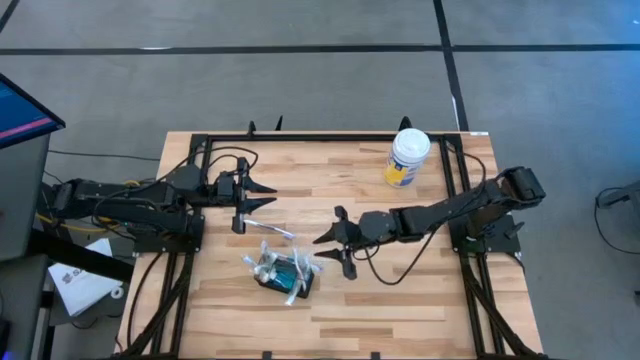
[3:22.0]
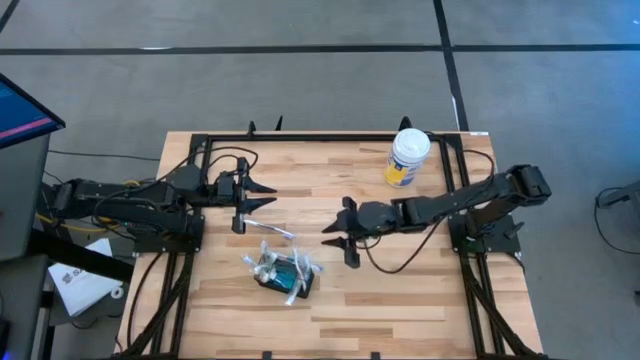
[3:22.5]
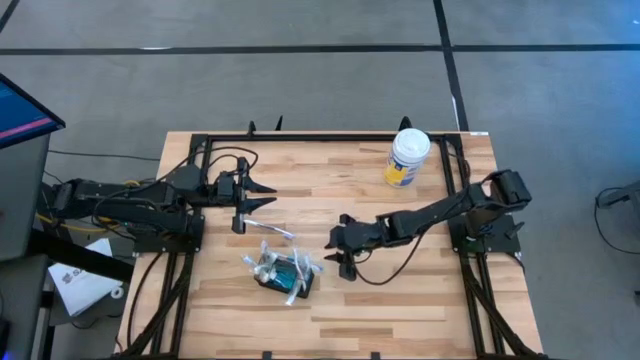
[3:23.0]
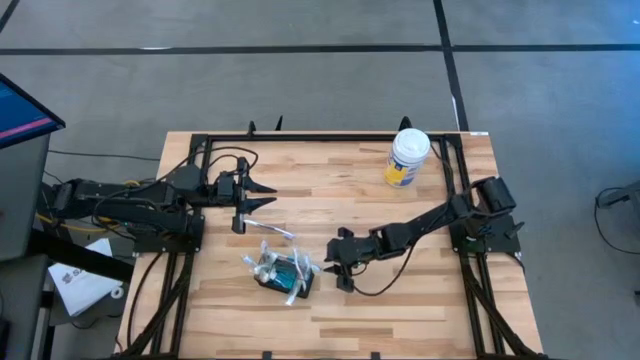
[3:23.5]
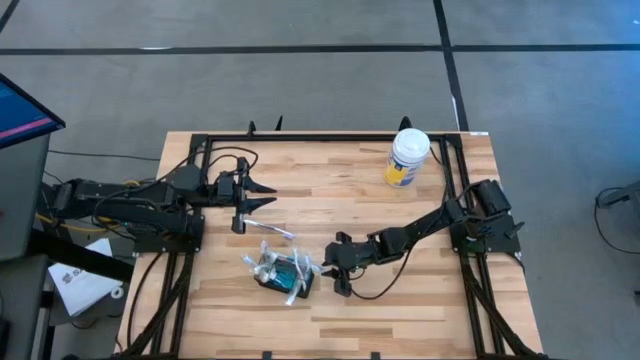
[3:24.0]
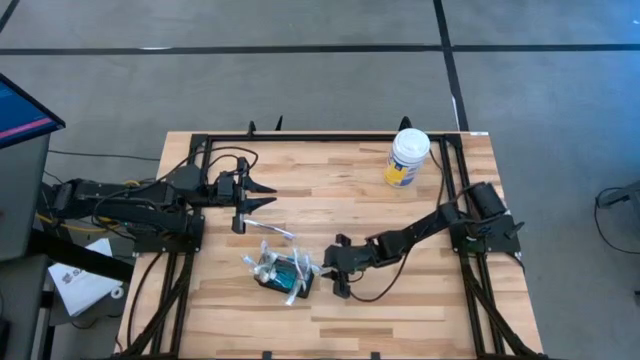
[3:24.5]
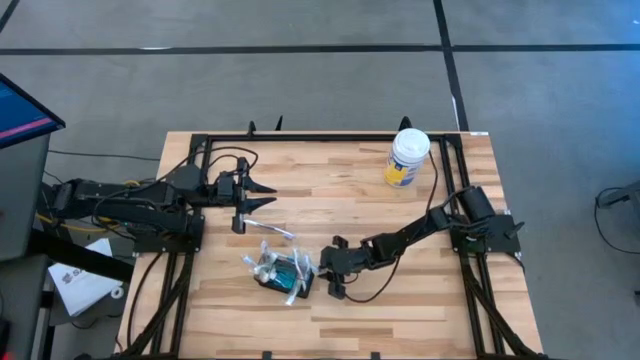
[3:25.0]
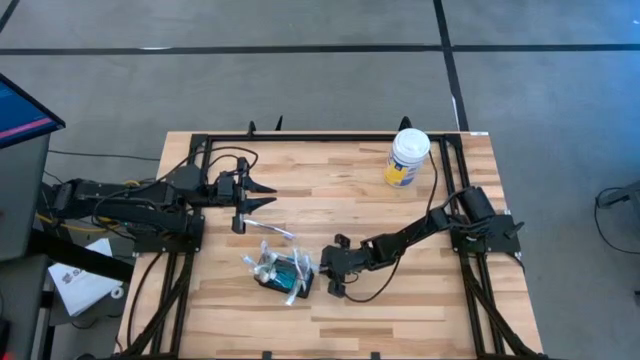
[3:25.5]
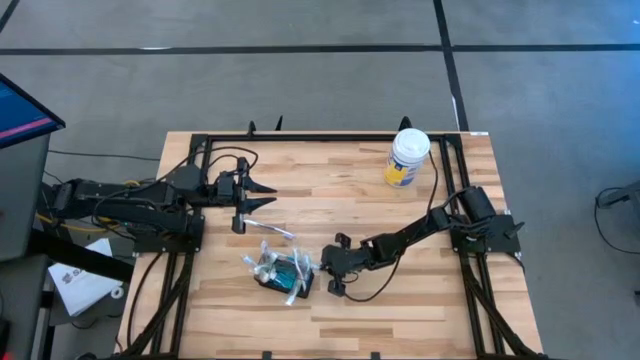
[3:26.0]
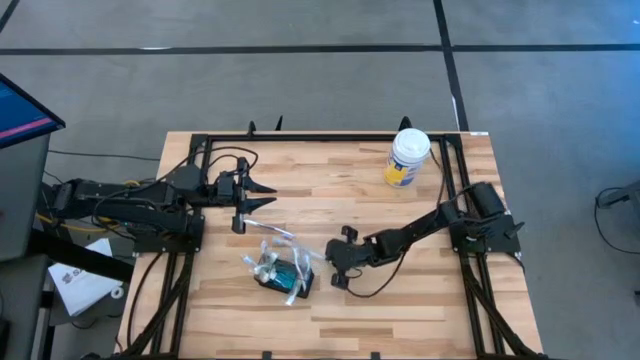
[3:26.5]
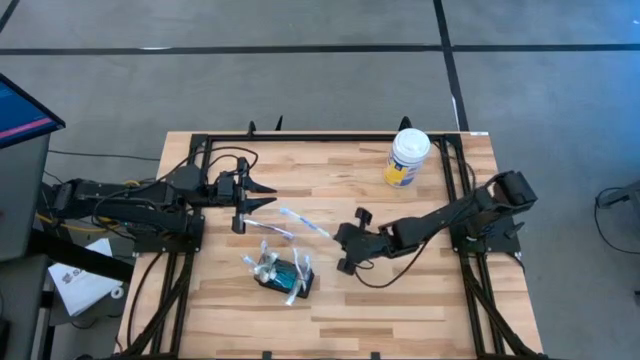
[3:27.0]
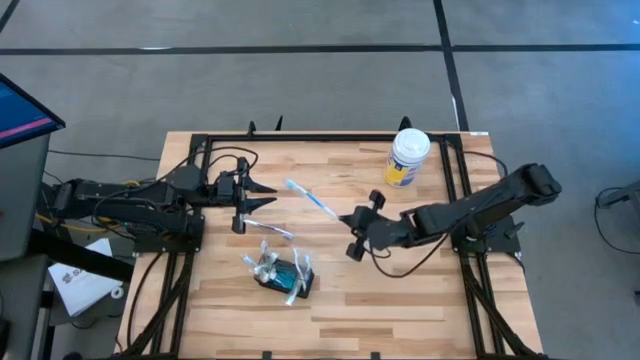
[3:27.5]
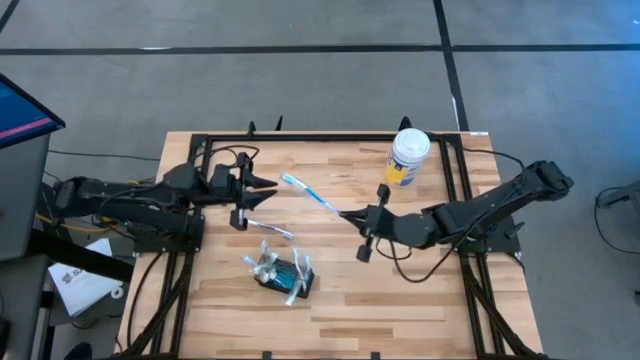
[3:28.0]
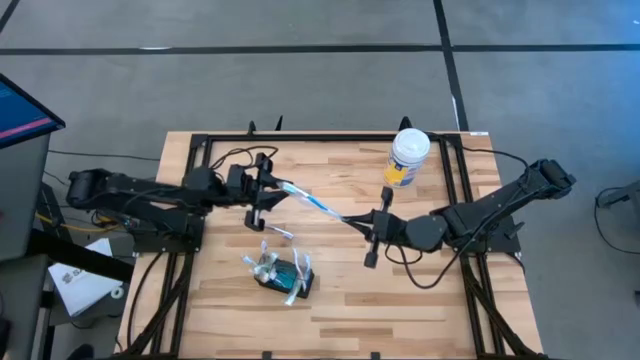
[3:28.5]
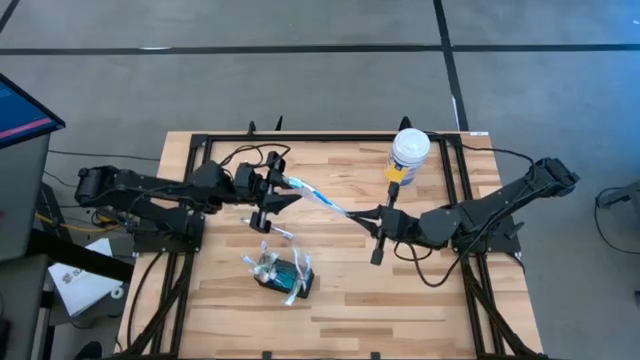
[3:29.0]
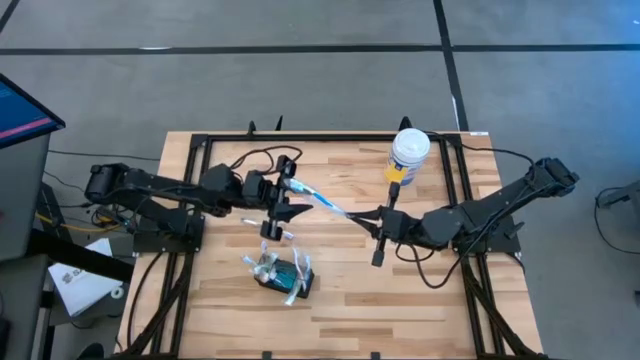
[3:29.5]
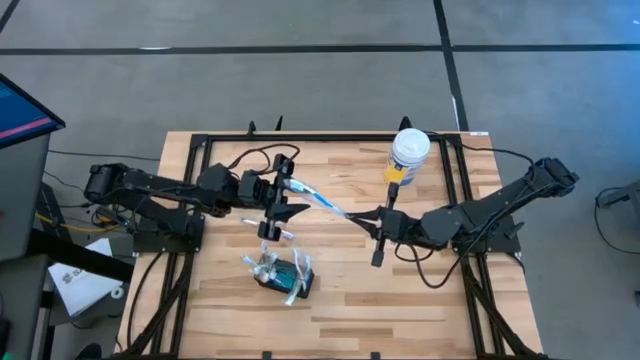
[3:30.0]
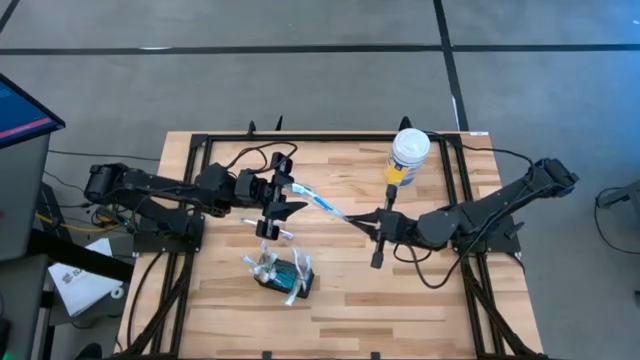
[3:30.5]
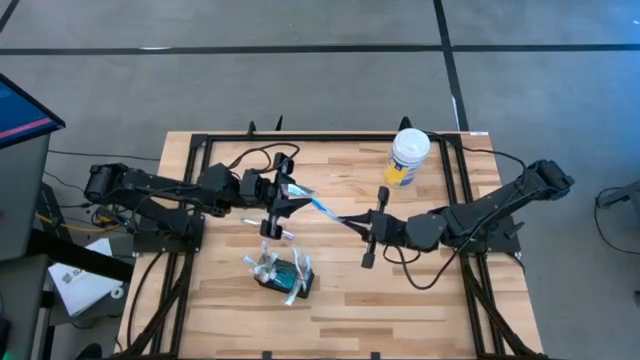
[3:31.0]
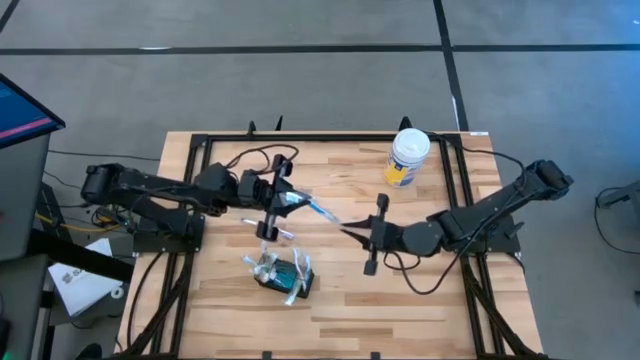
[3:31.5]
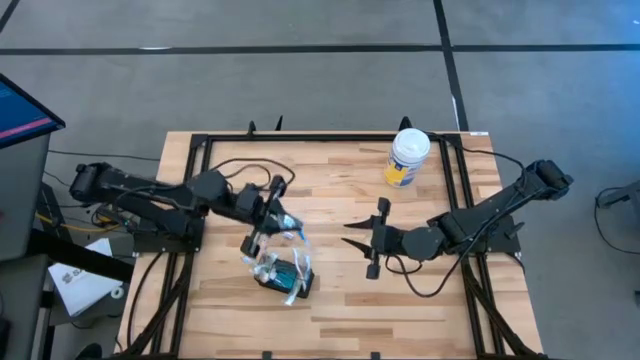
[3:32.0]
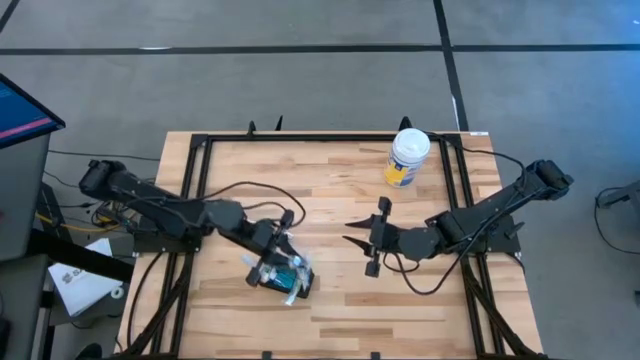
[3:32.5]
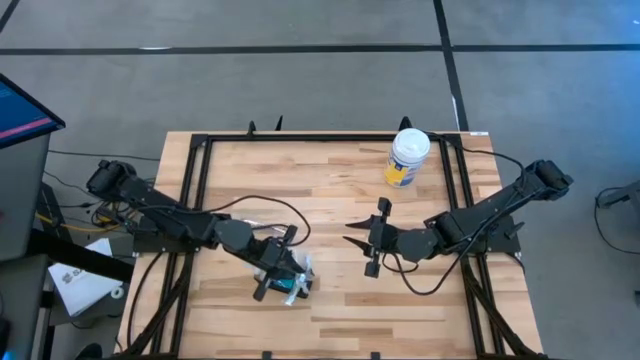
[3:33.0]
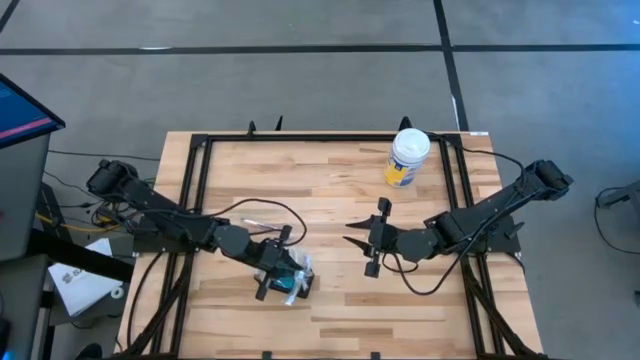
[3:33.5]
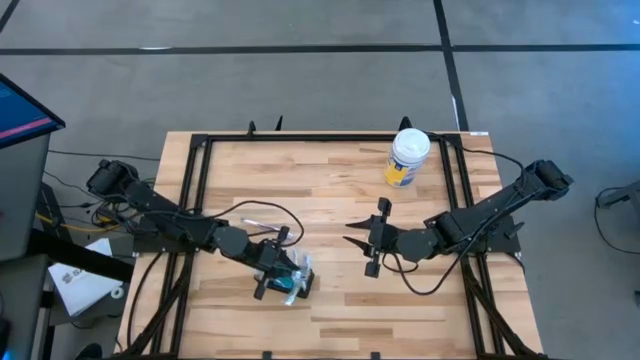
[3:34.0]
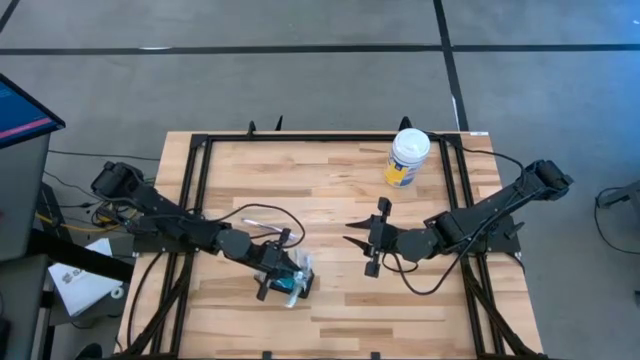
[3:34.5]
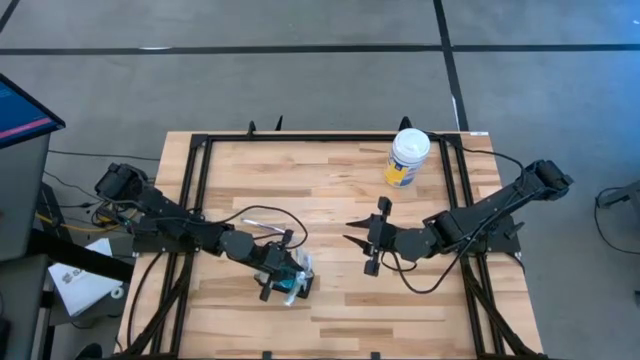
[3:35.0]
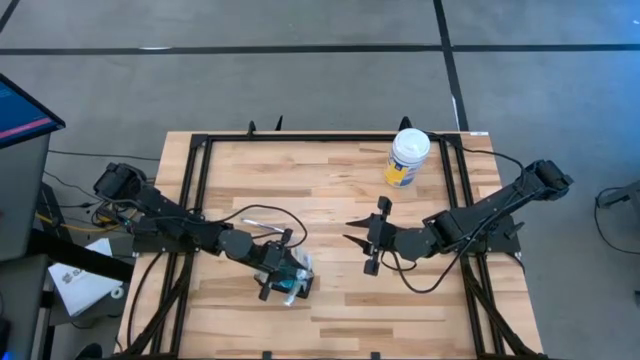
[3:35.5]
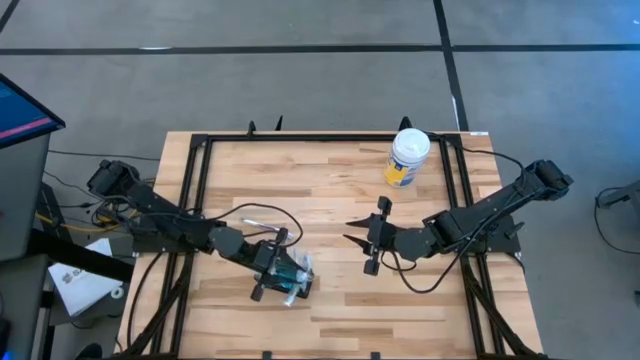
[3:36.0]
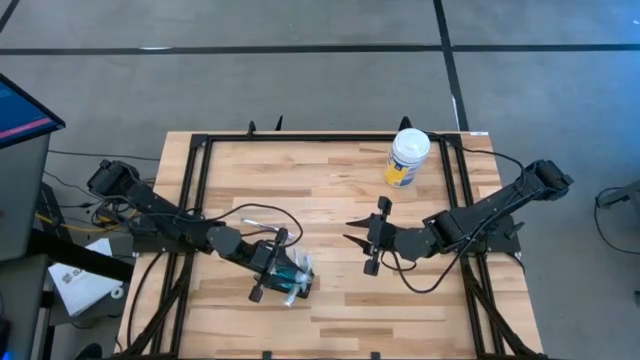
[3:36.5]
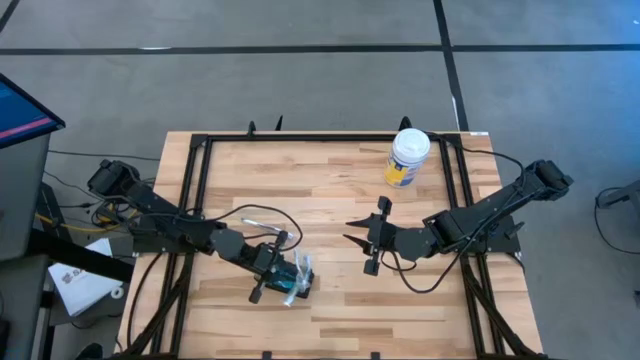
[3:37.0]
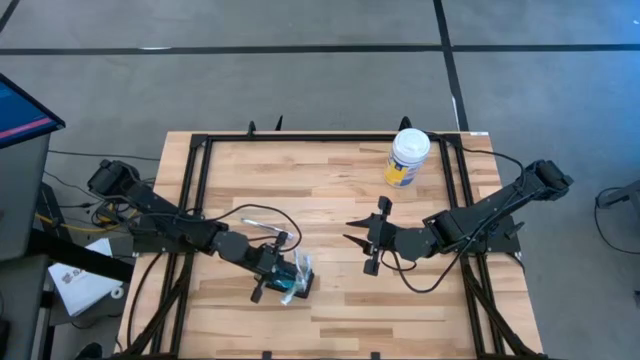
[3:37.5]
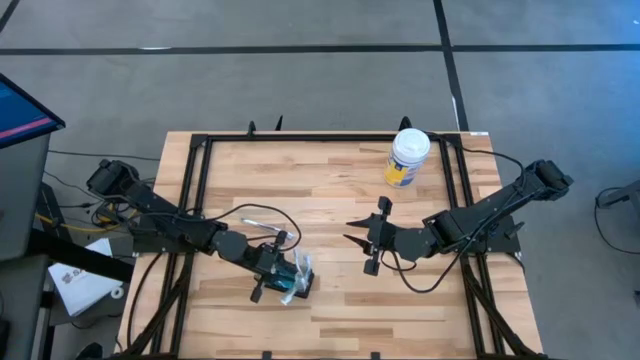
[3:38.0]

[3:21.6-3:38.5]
Task: Pick & Place toothbrushing station
Put the blue toothbrush into the mesh organizer
